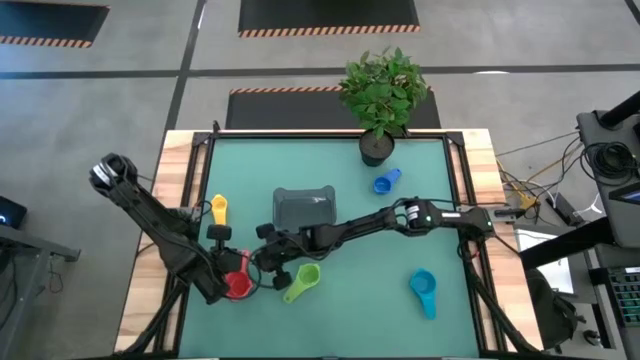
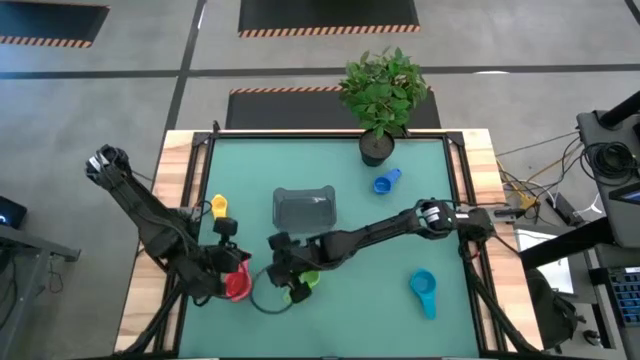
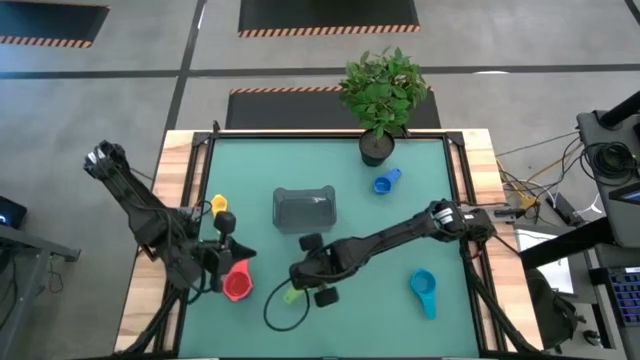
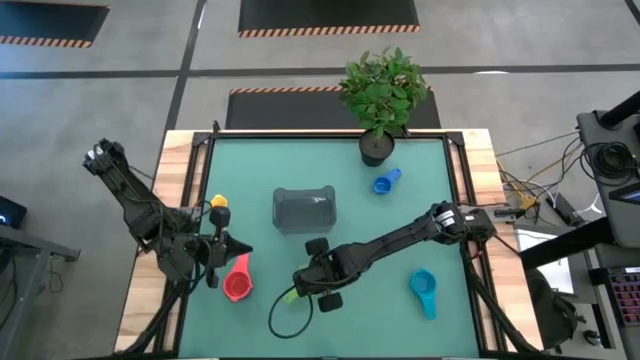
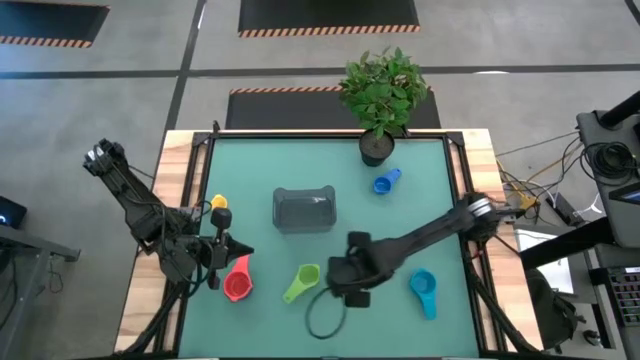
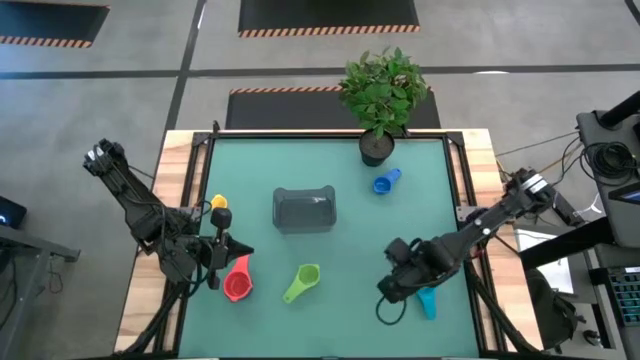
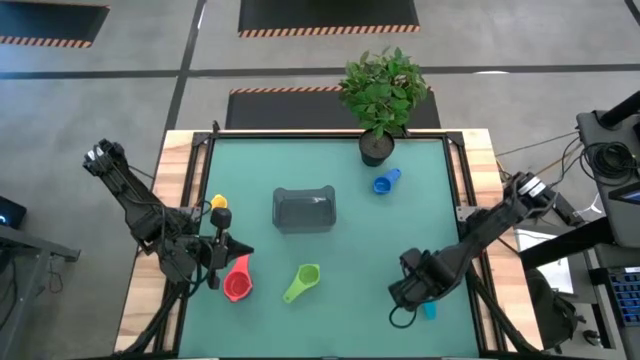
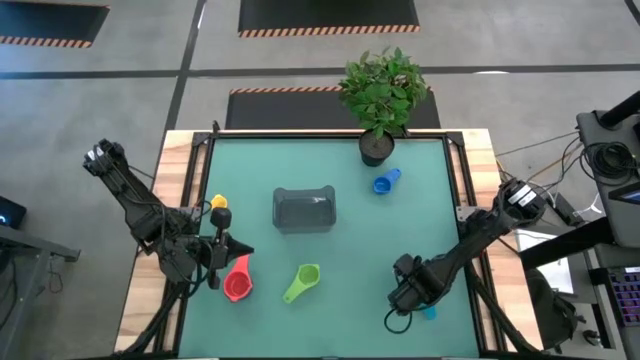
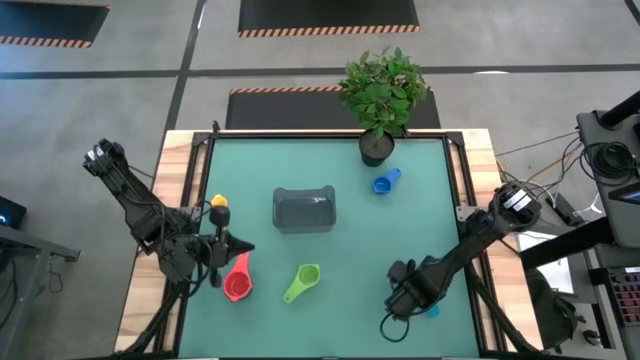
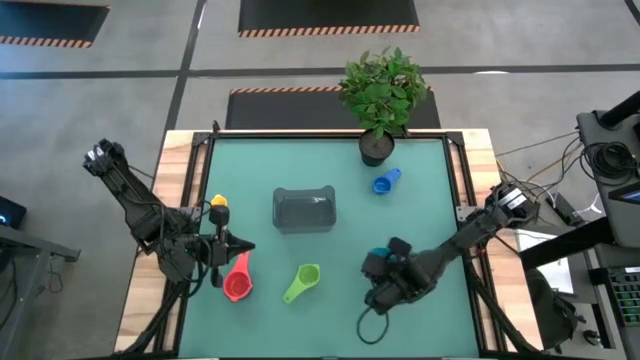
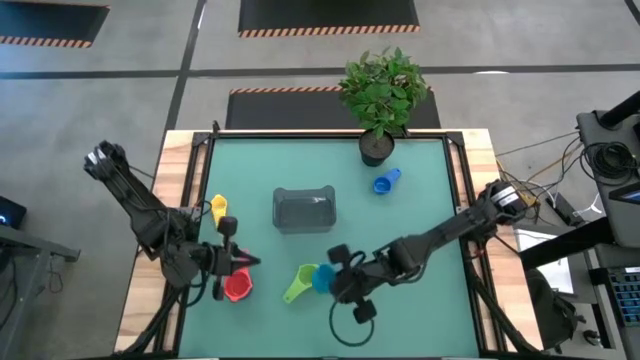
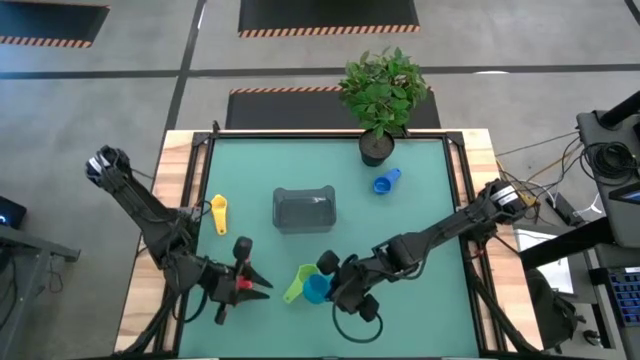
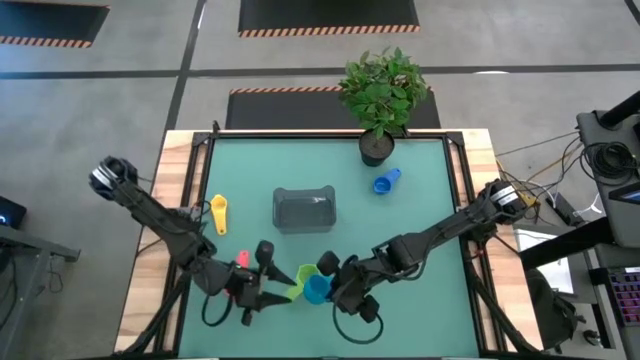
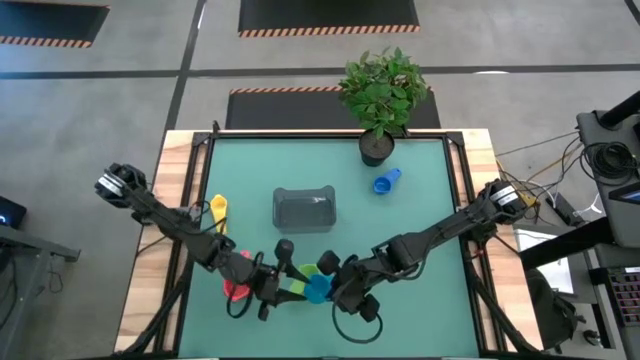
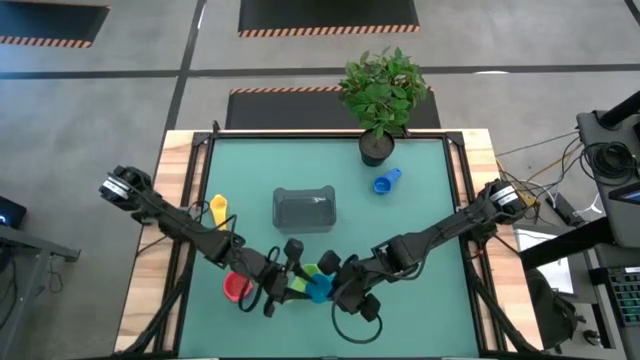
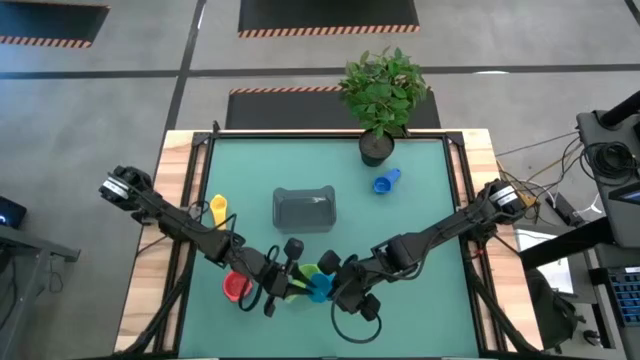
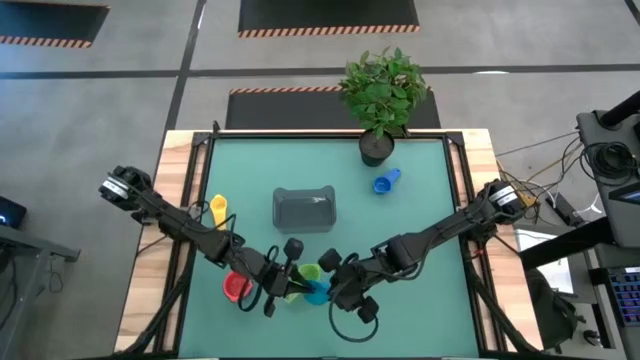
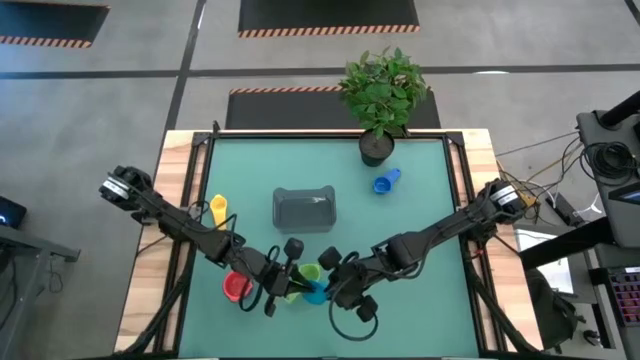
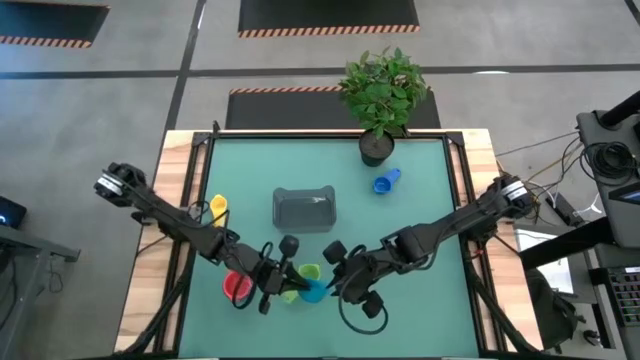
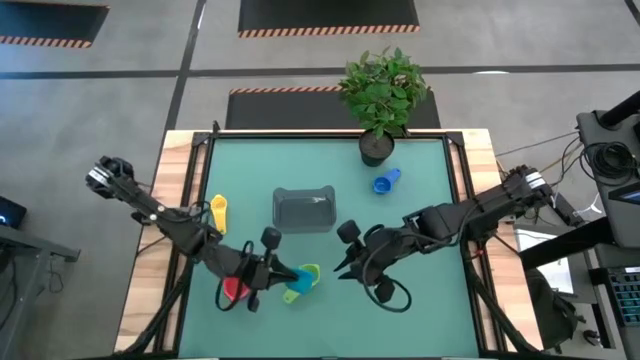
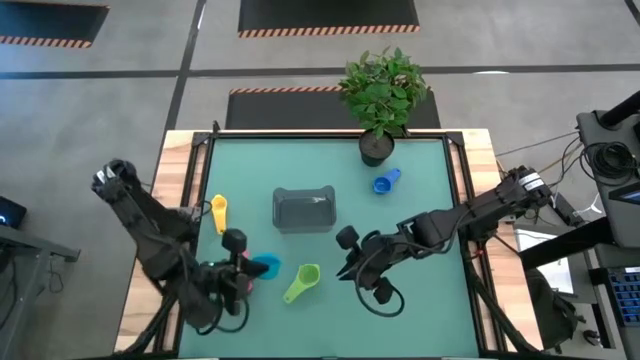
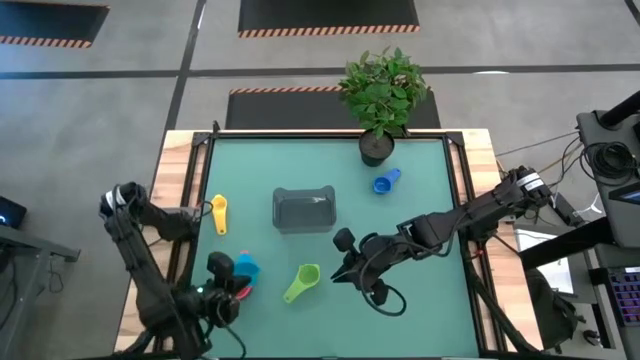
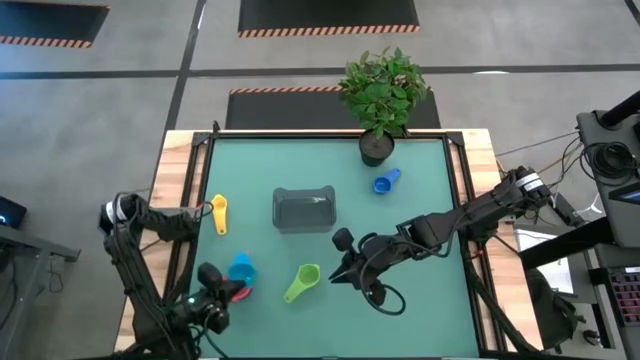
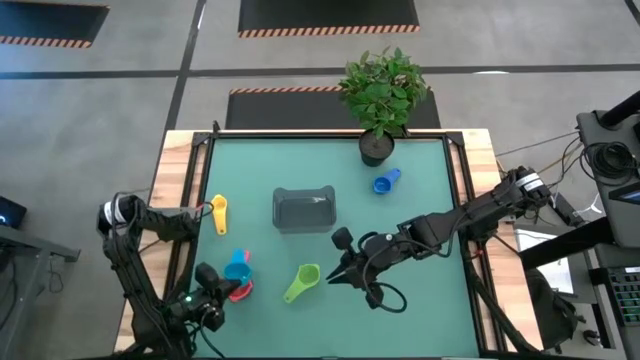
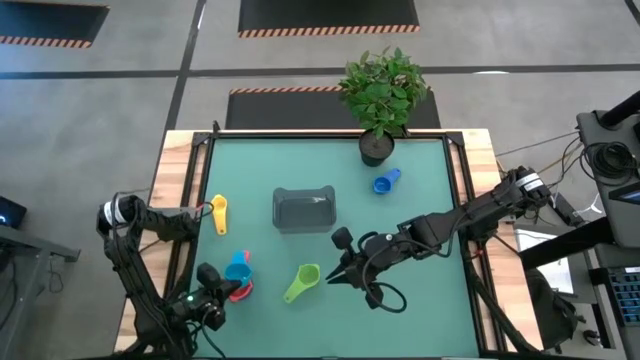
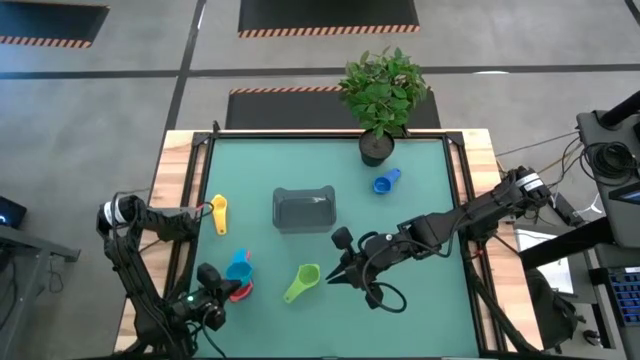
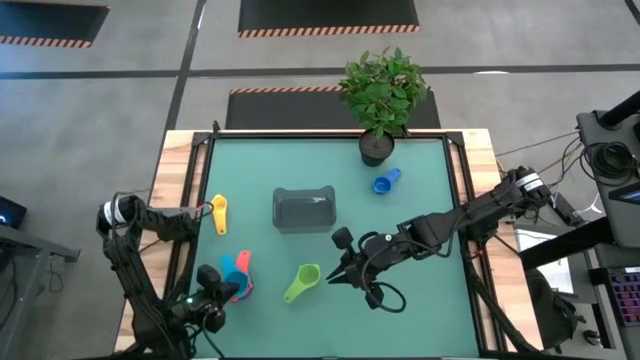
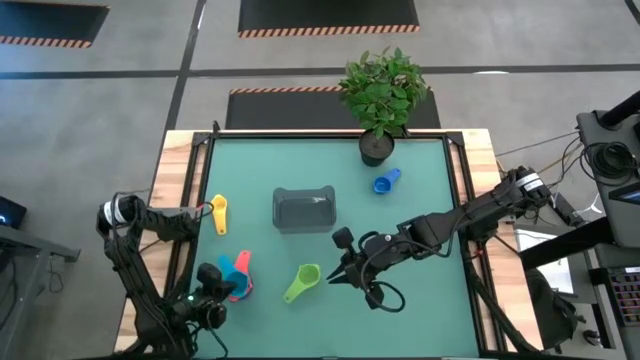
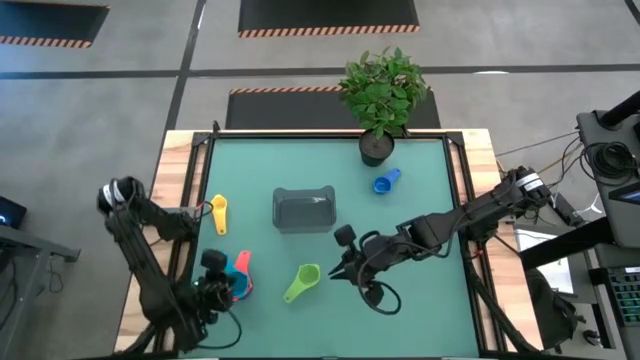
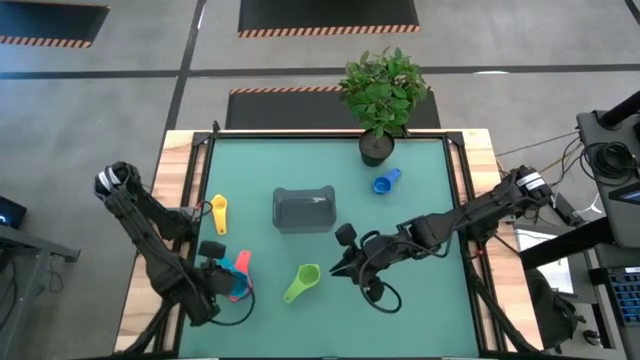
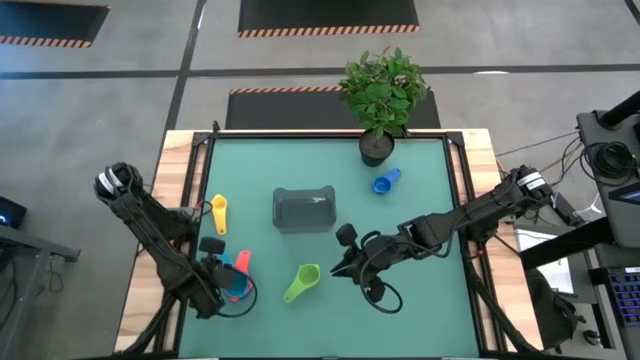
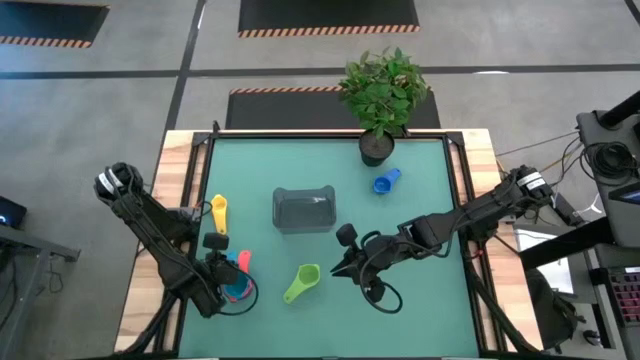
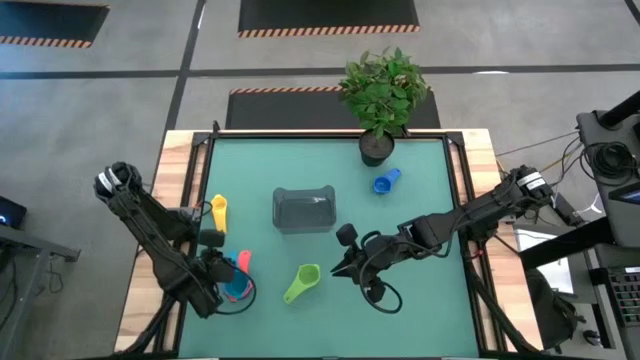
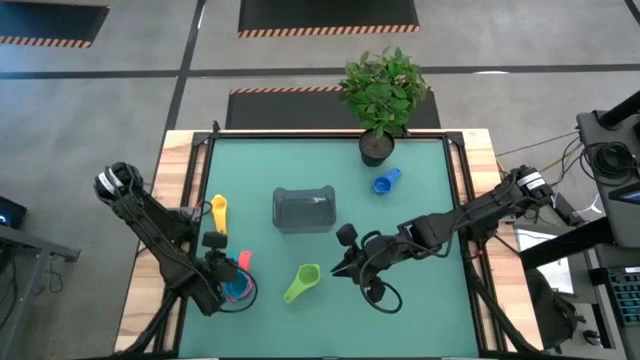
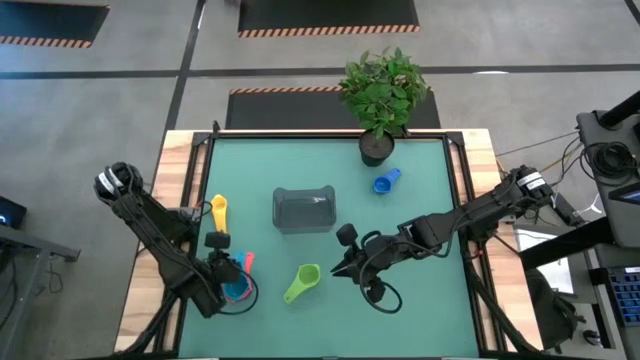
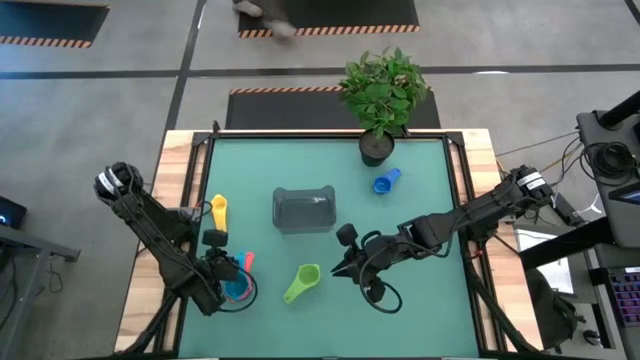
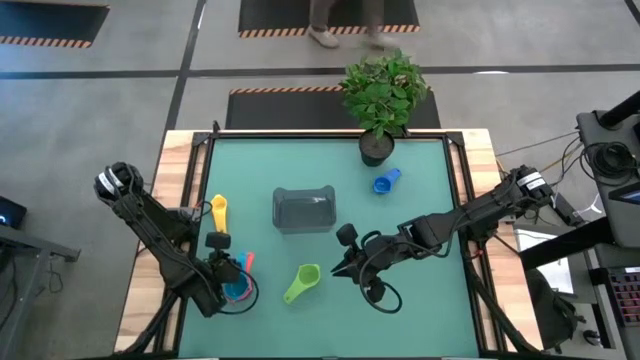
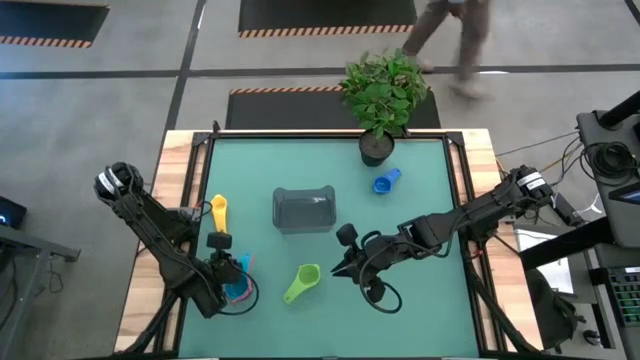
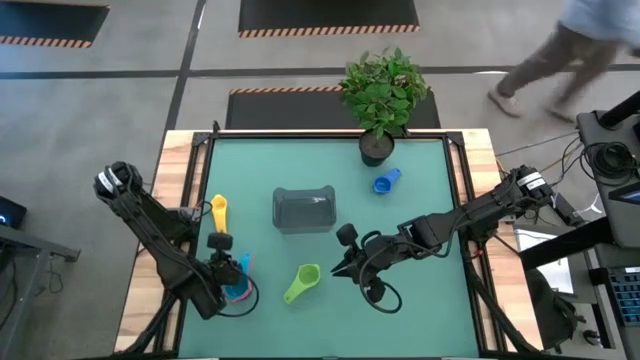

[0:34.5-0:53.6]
Task: Nest measuring cups in basket
Stack the light blue measuring cup on top of the red measuring cup
